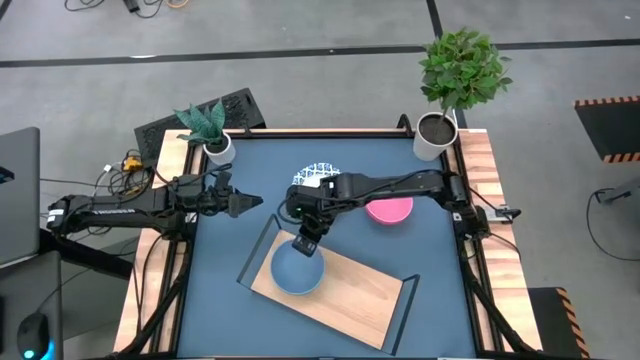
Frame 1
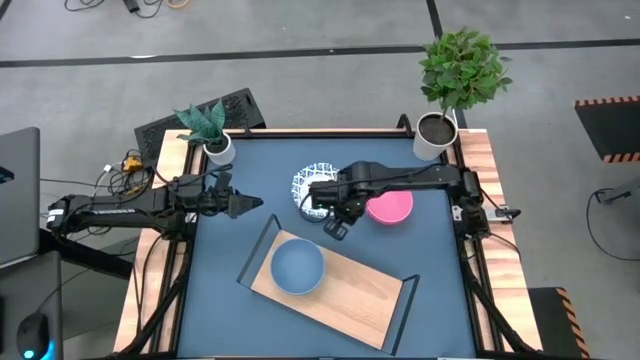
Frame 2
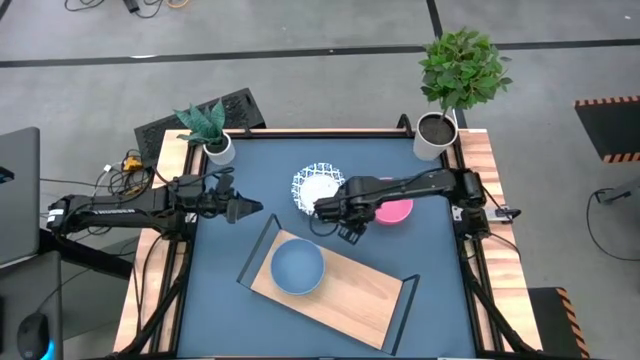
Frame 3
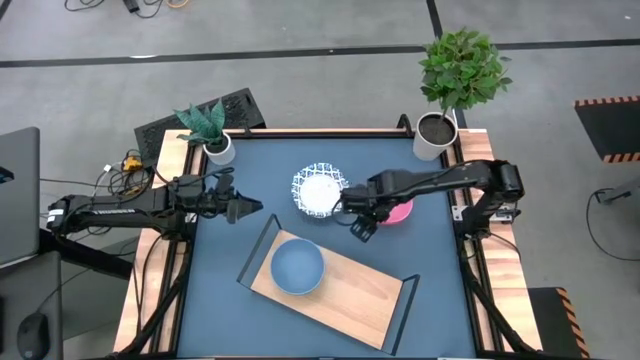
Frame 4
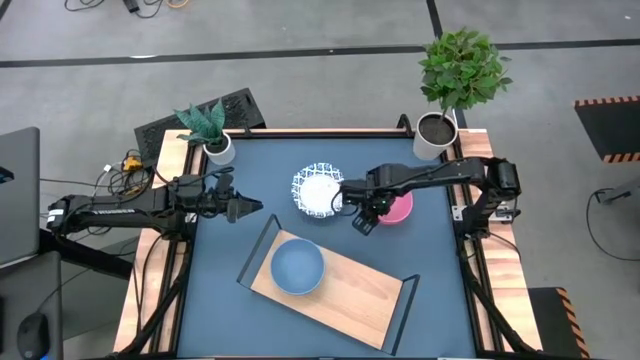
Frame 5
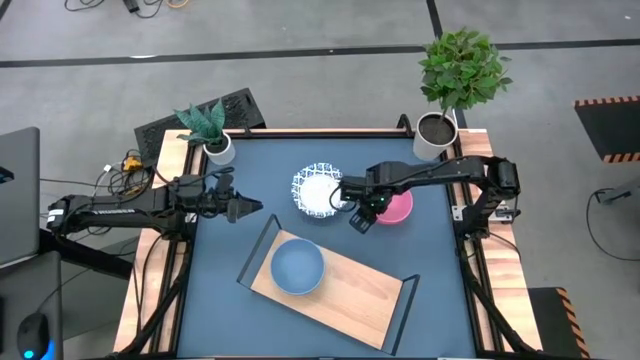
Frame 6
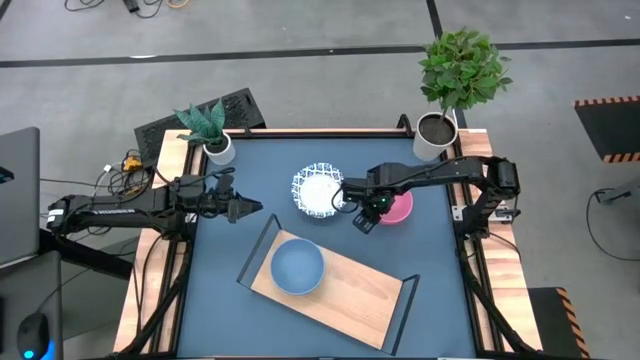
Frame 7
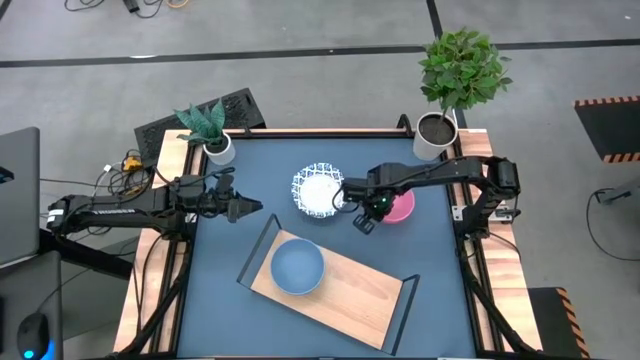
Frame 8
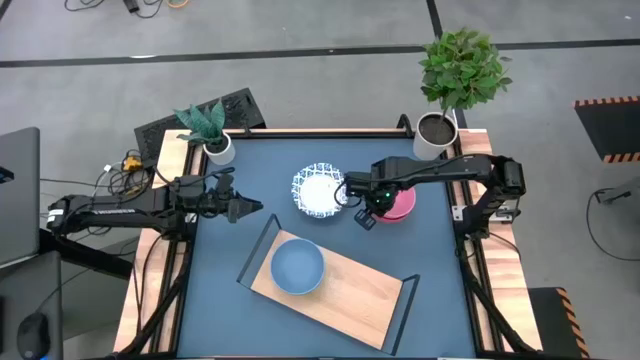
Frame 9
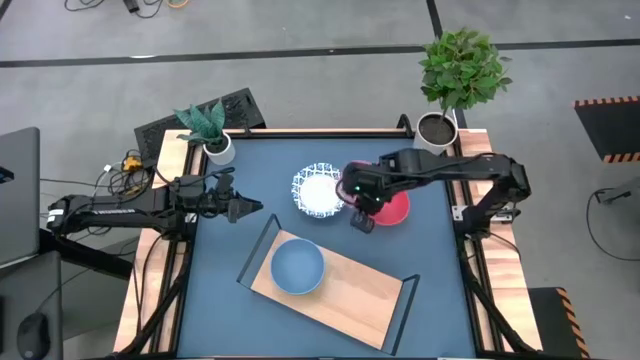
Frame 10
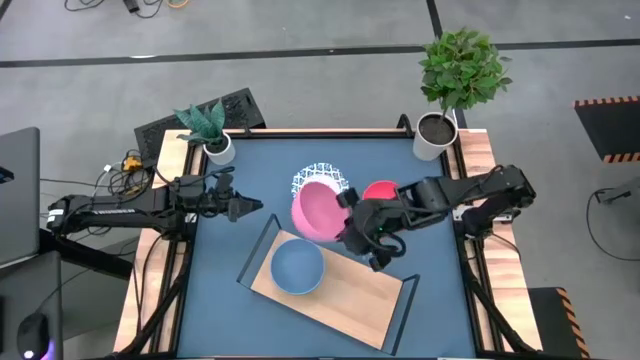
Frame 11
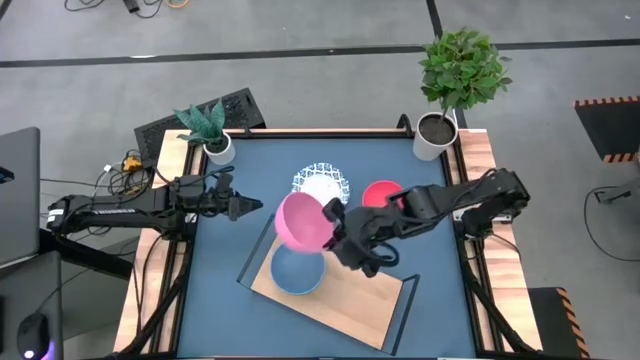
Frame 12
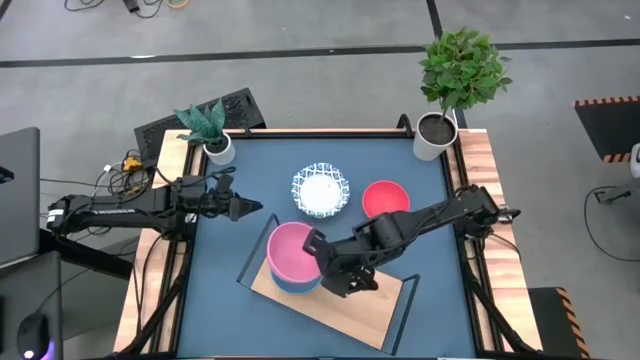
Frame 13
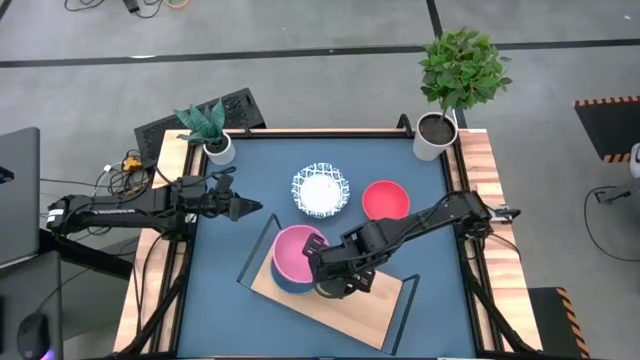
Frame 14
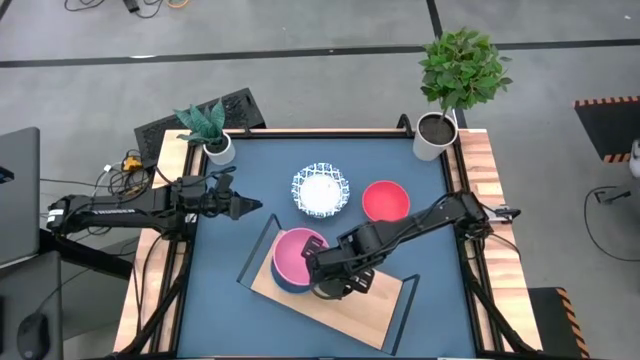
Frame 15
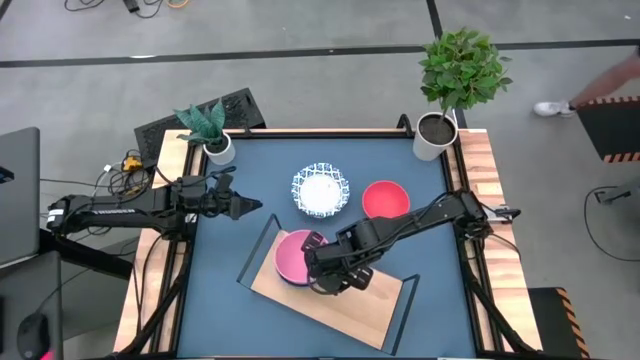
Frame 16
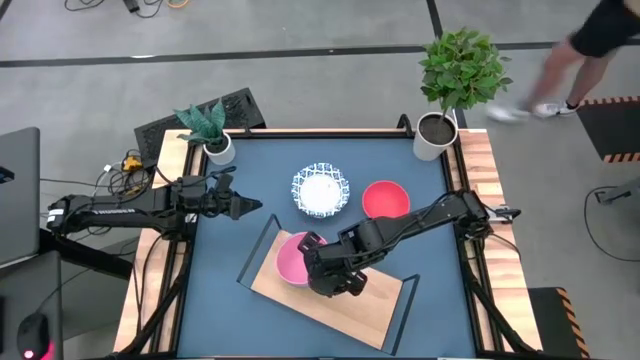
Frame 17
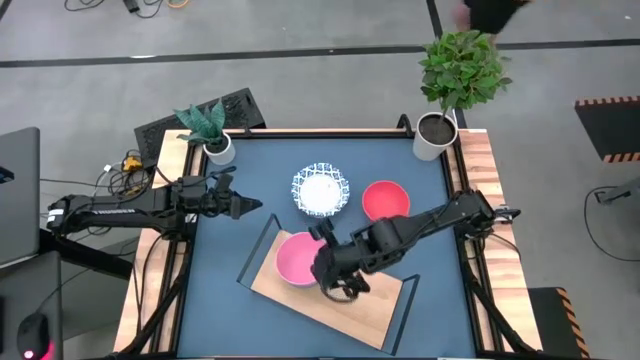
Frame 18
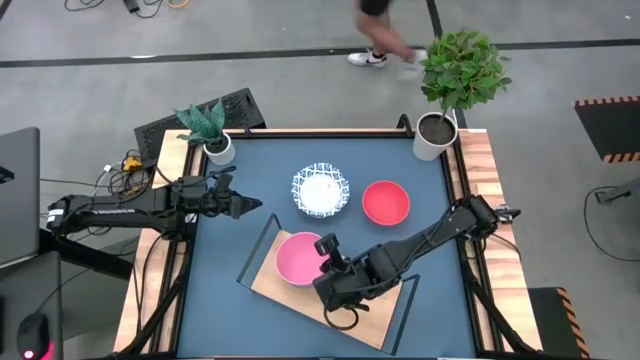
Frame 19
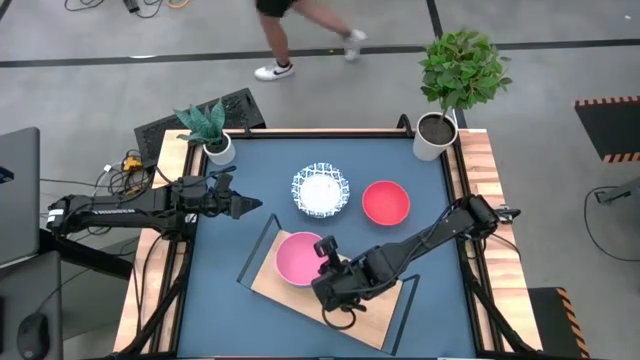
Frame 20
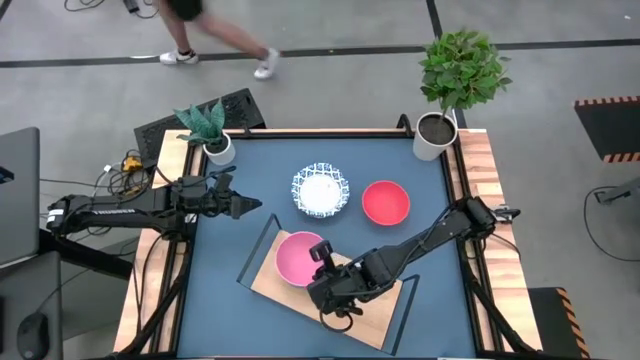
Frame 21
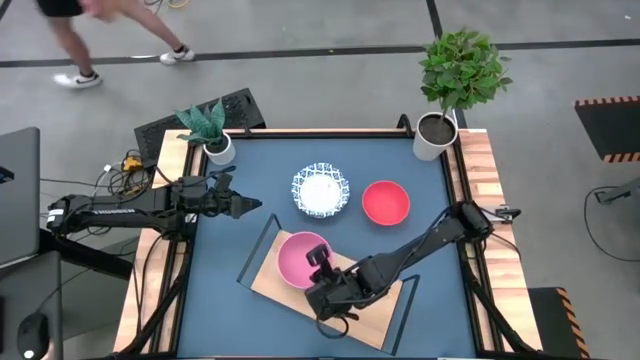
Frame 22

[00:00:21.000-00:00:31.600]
Task: Place and stack bowls onto a shelf
Stack the pink bowl on top of the blue bowl on the shelf

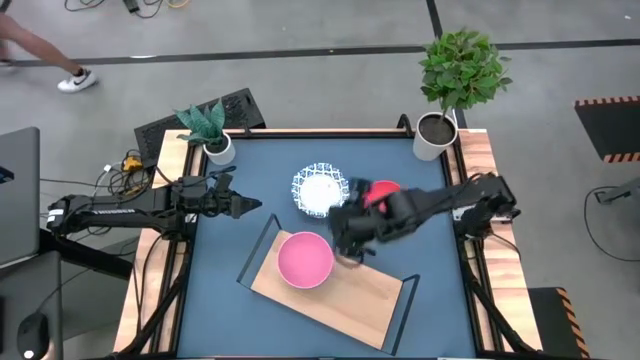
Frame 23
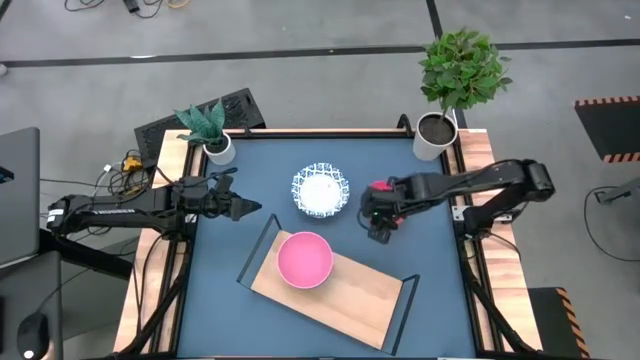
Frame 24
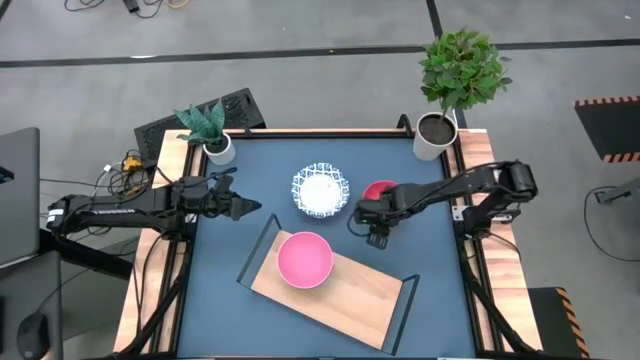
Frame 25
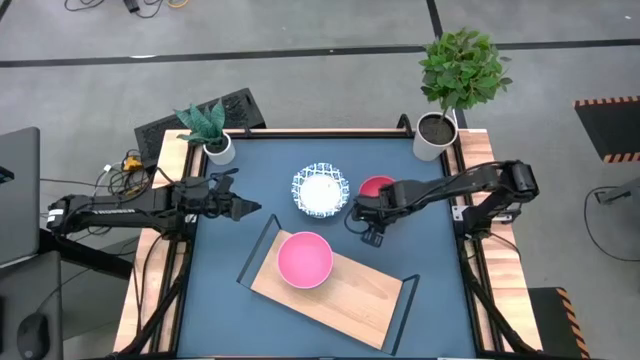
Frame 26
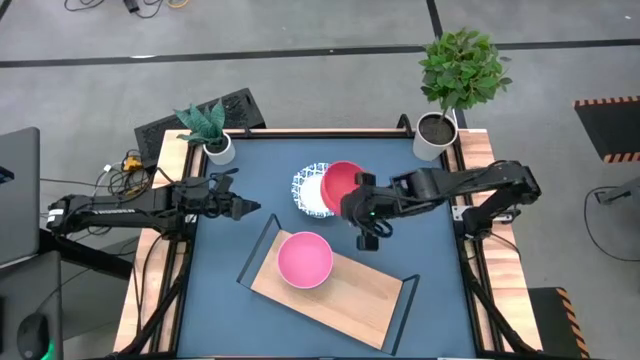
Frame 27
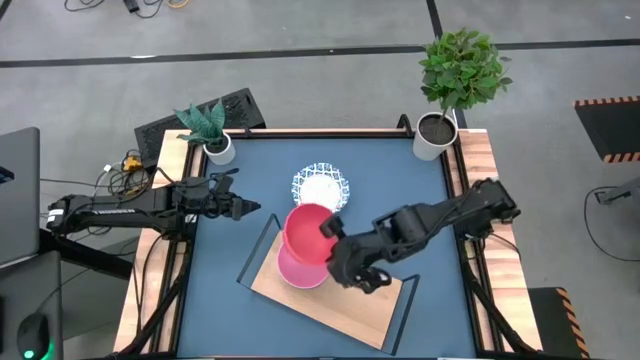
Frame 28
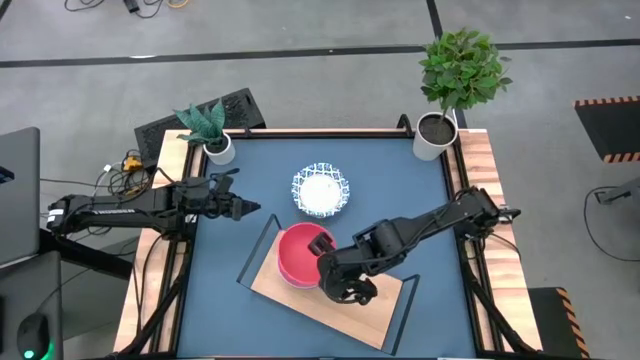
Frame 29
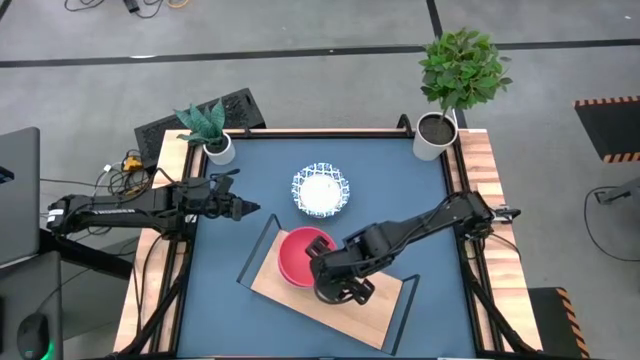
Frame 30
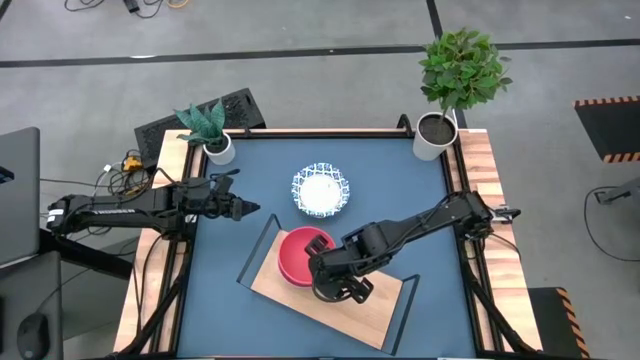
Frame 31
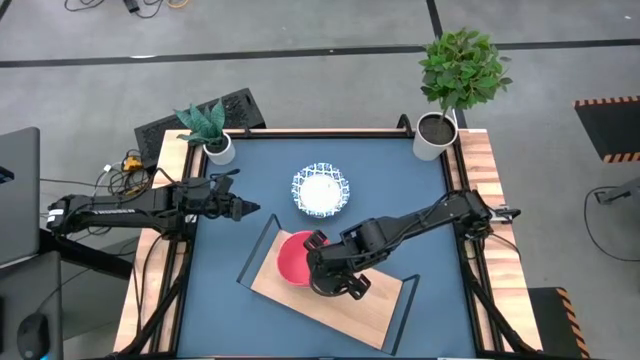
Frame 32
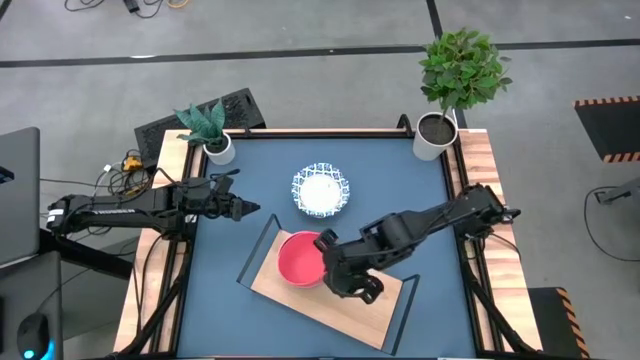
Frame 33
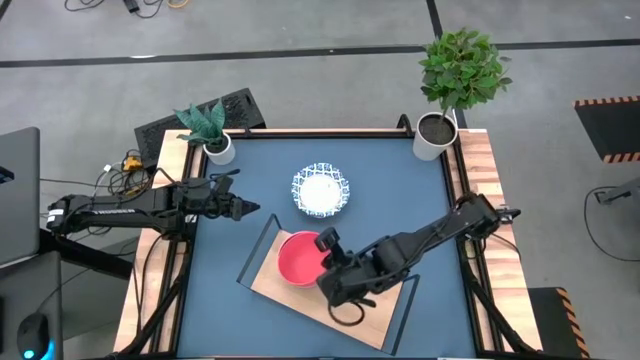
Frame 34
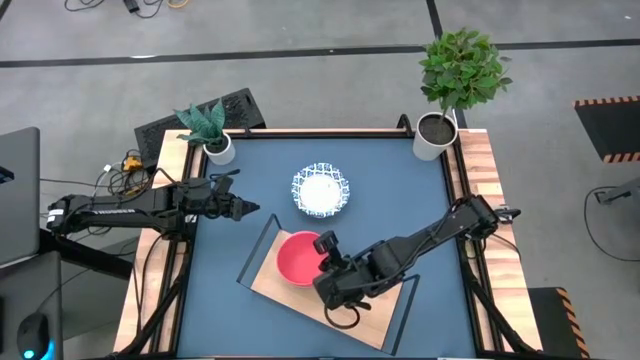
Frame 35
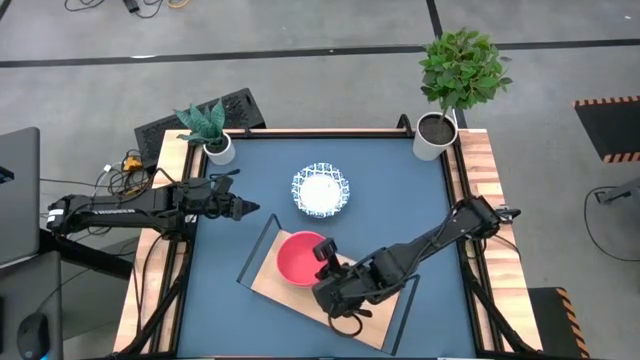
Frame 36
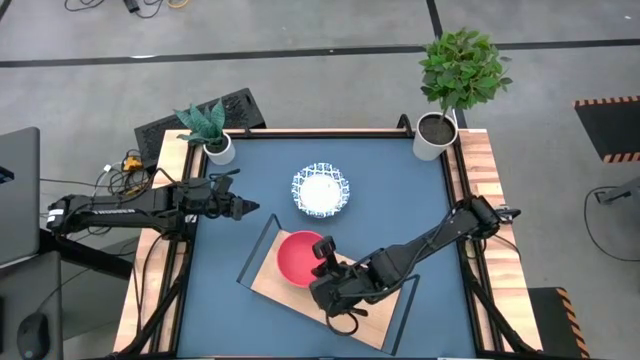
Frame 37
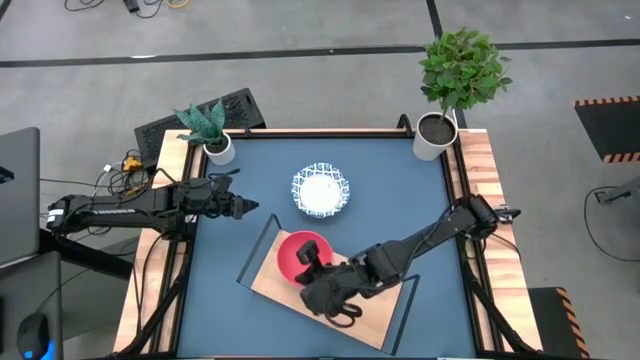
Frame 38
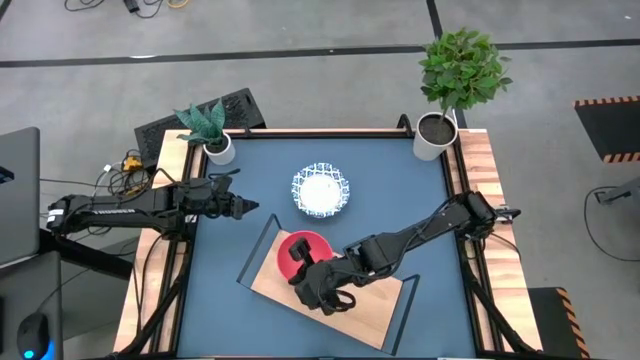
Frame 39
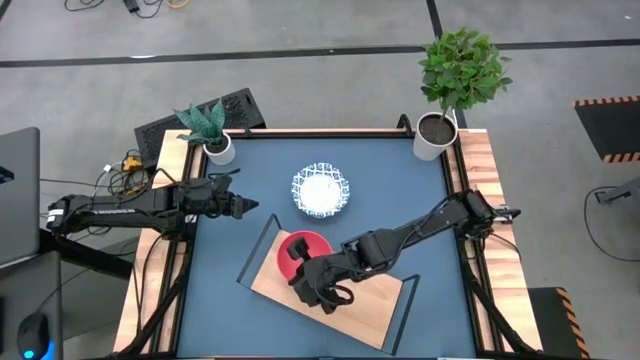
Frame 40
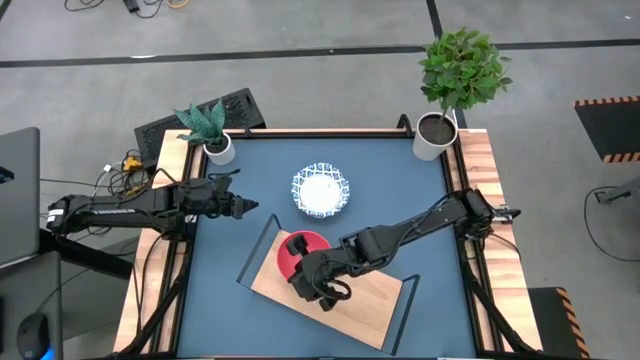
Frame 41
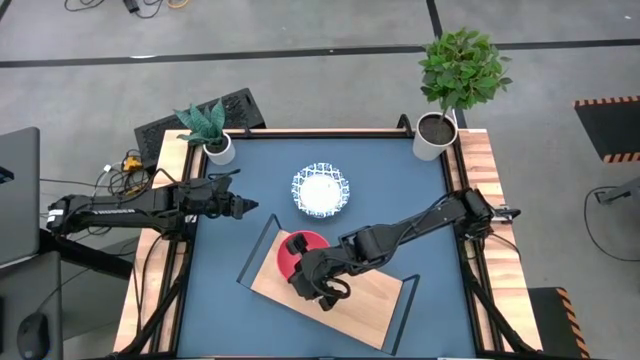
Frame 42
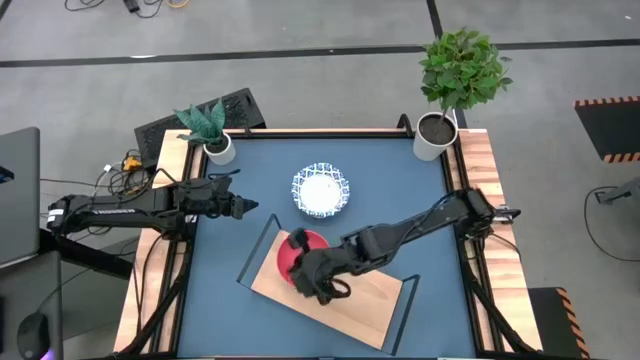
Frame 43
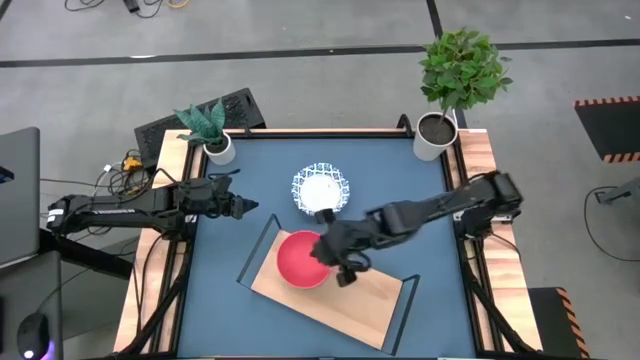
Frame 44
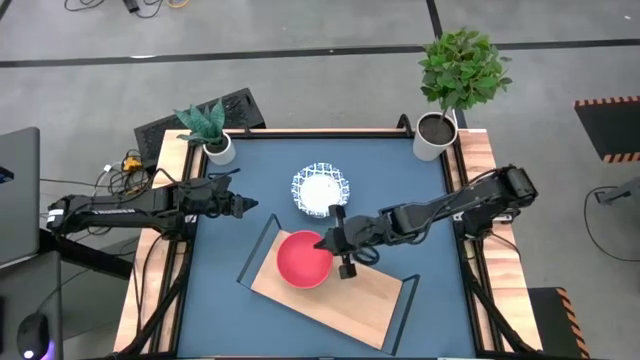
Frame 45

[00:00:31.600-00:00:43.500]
Stack the orange bowl on top of the pink bowl on the shelf
